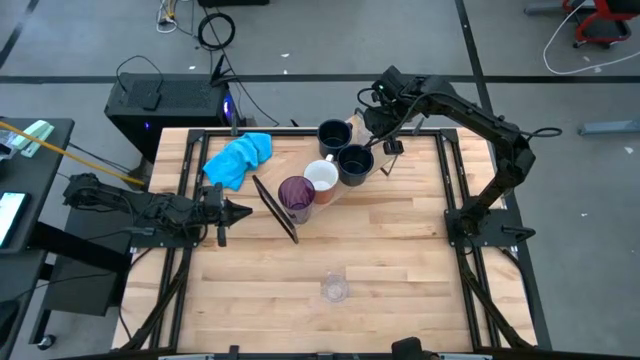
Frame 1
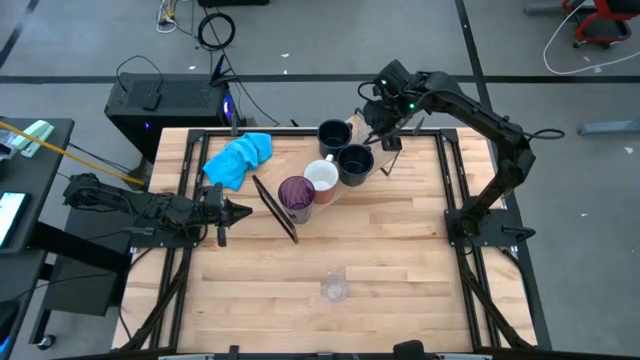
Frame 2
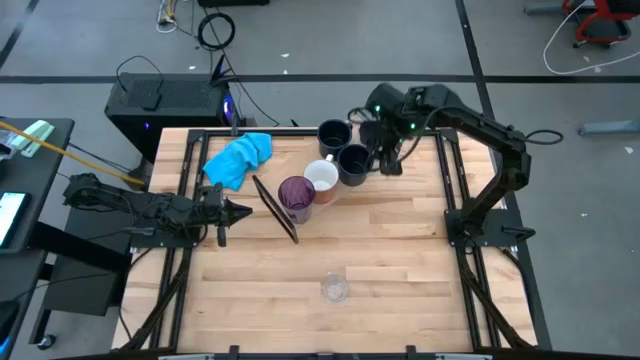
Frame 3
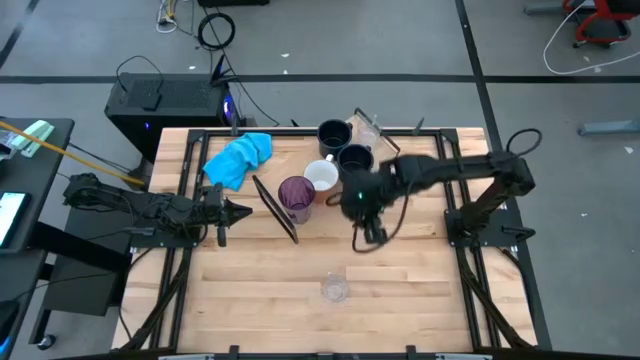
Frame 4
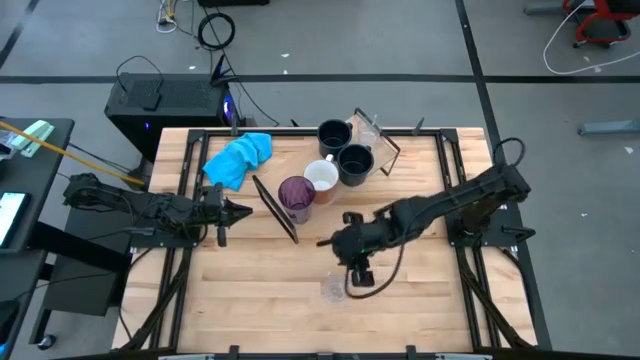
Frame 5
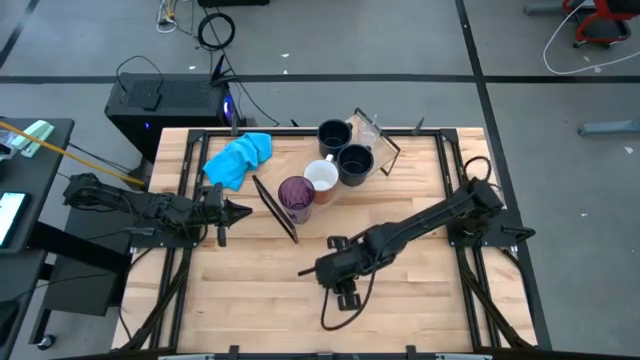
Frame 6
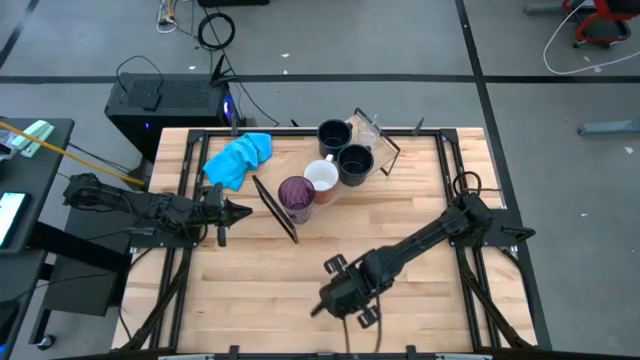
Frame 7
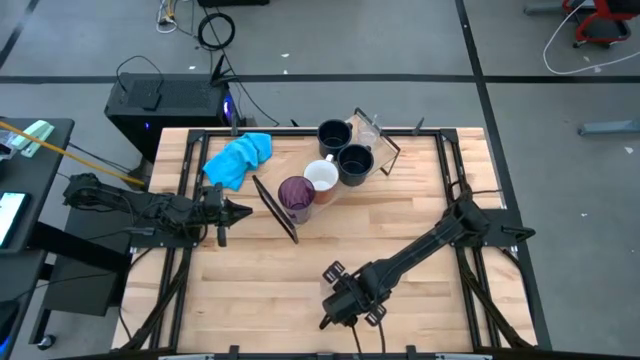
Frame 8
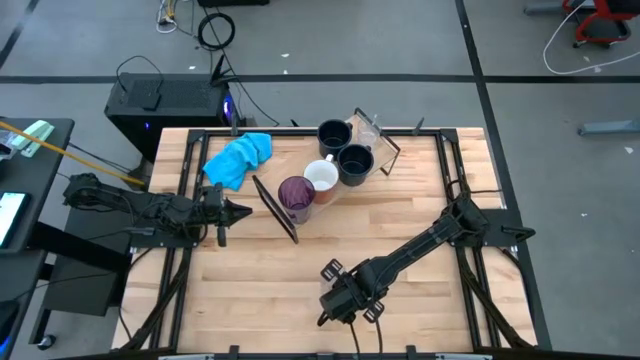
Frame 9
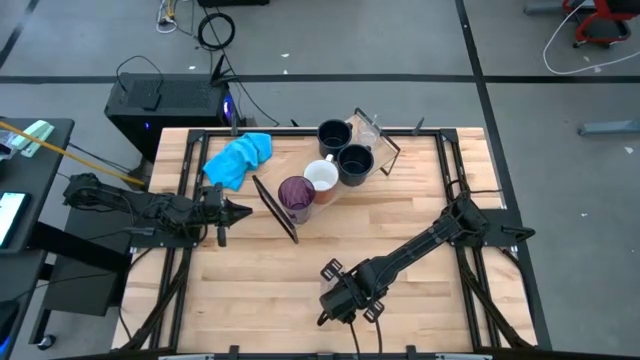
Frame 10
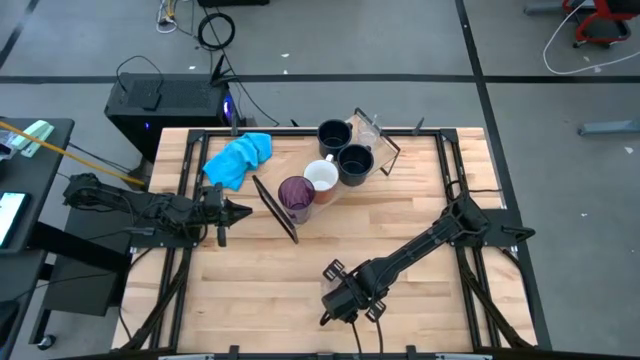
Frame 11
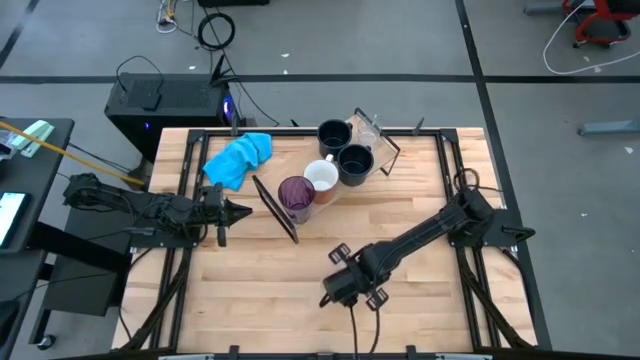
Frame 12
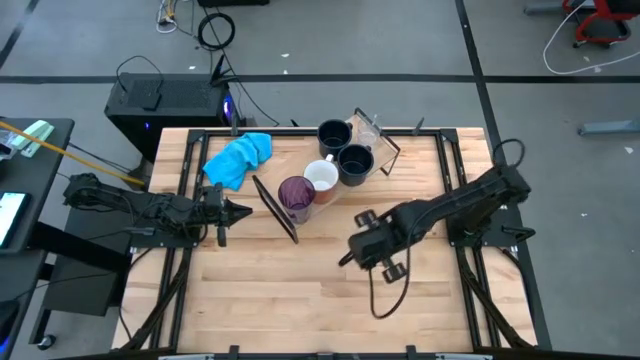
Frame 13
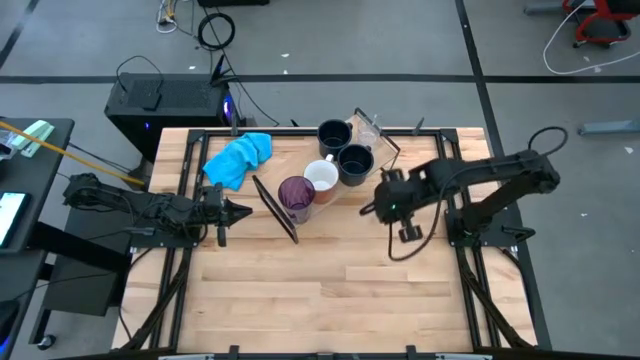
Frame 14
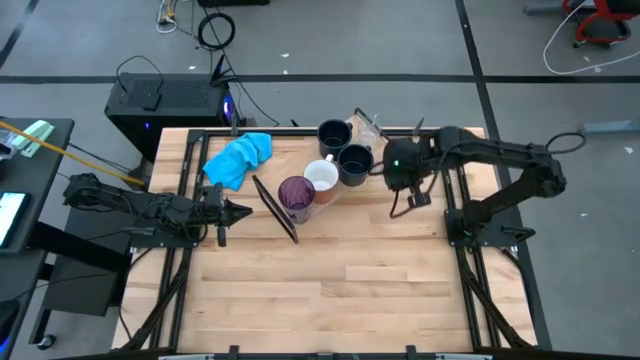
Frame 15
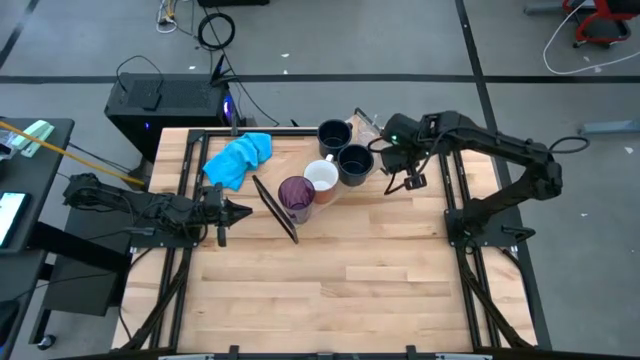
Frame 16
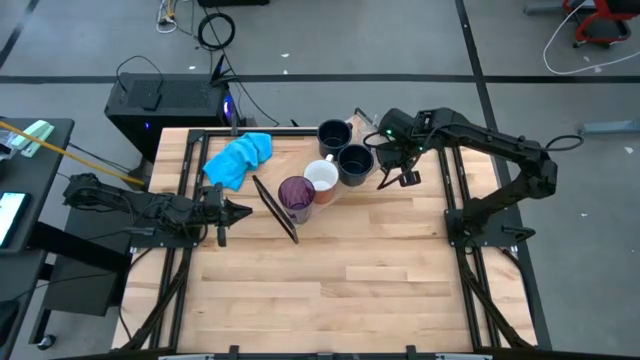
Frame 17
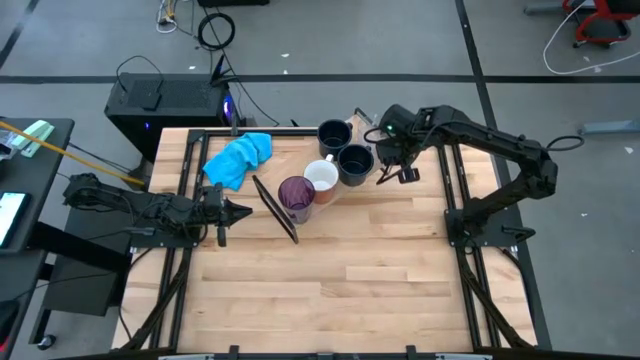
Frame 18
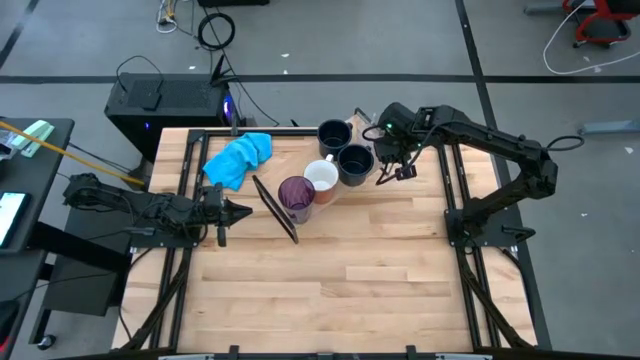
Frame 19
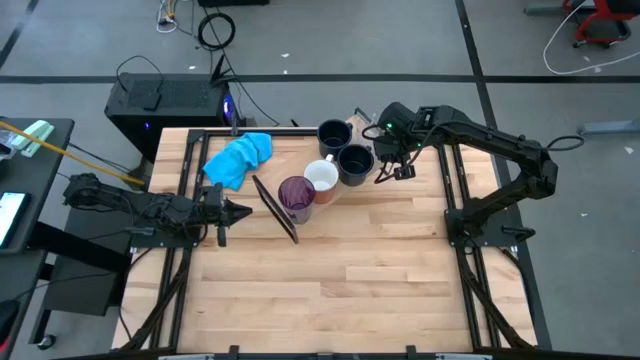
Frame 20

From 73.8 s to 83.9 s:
Task: Stack small to large cups/mugs on shelf
Put the transparent mug on the shelf aligned with the other transparent mug

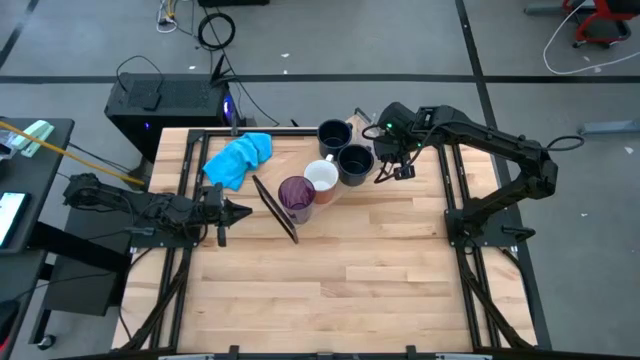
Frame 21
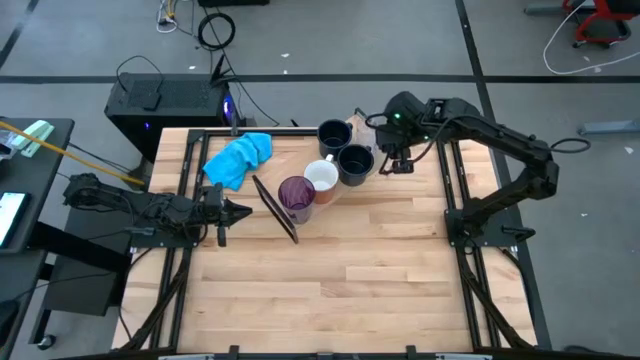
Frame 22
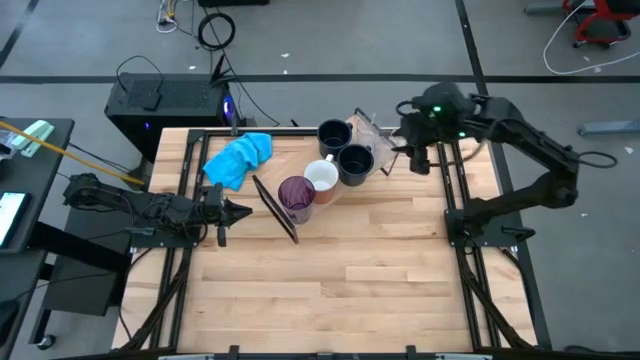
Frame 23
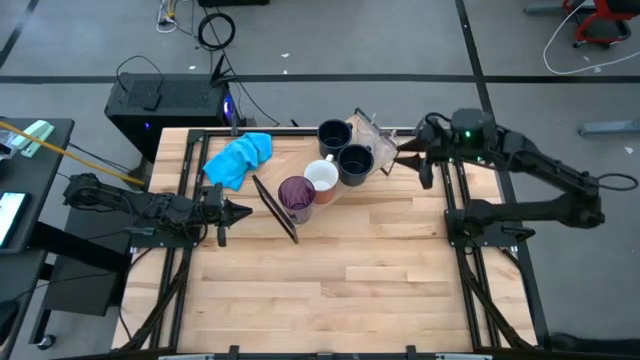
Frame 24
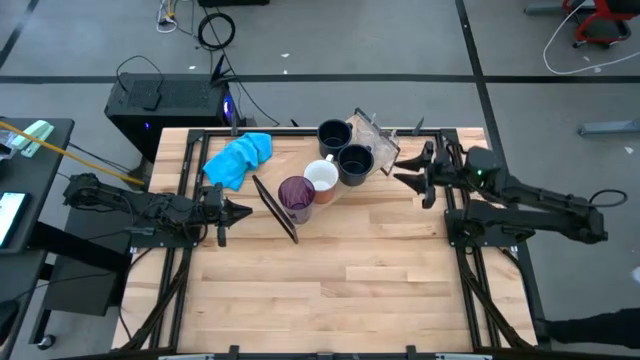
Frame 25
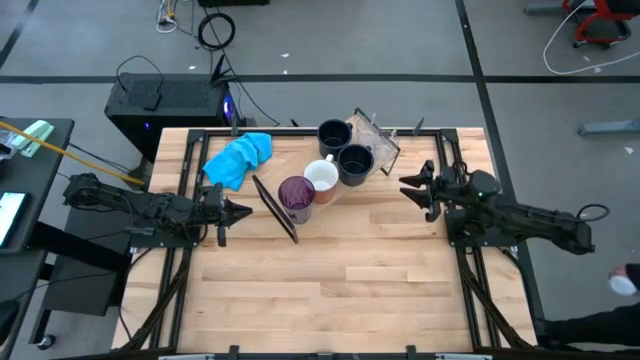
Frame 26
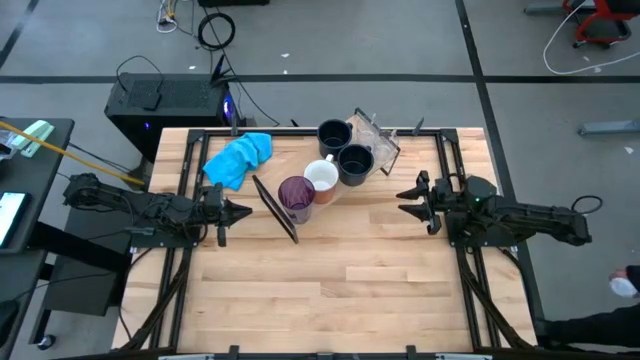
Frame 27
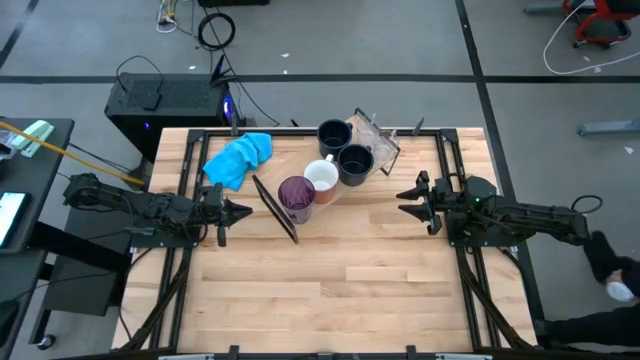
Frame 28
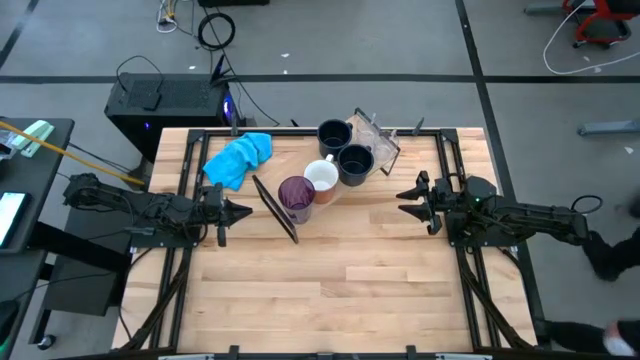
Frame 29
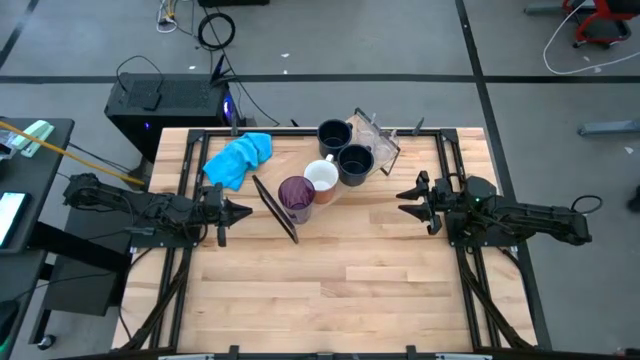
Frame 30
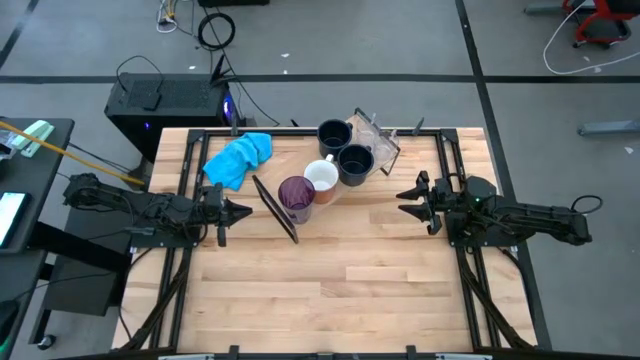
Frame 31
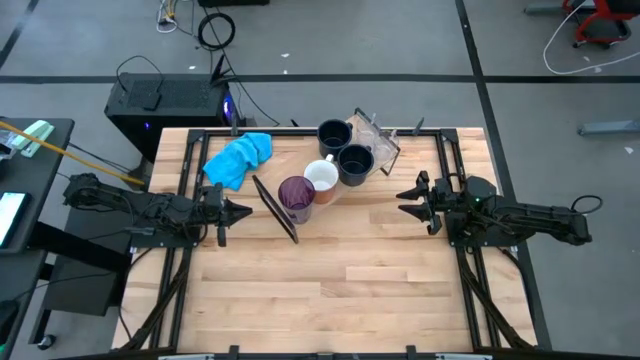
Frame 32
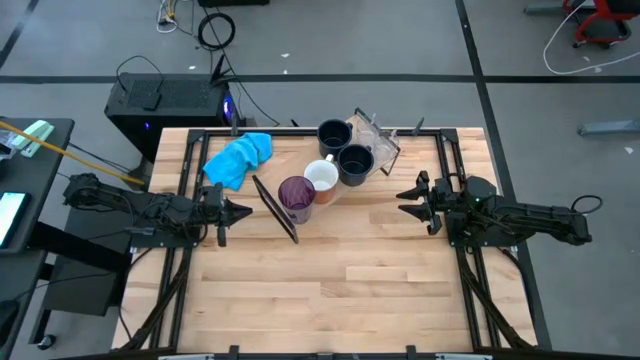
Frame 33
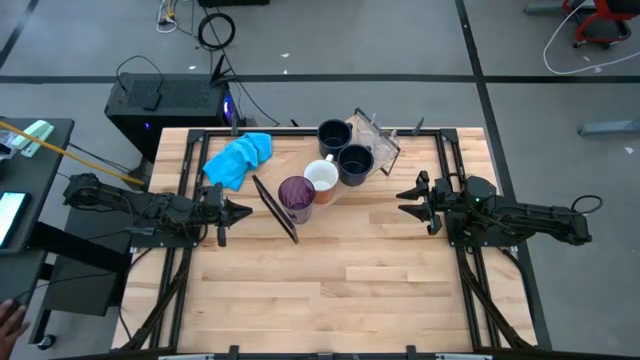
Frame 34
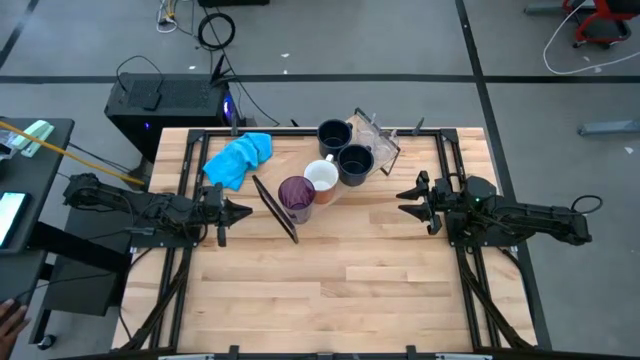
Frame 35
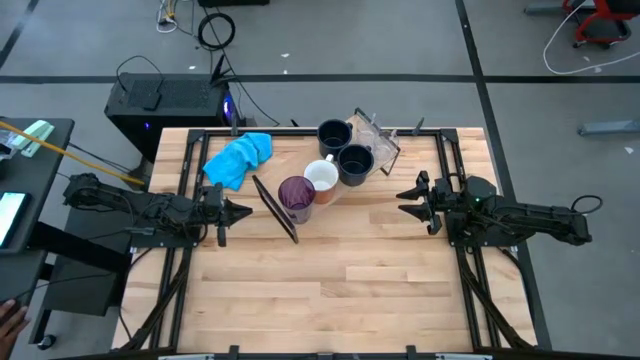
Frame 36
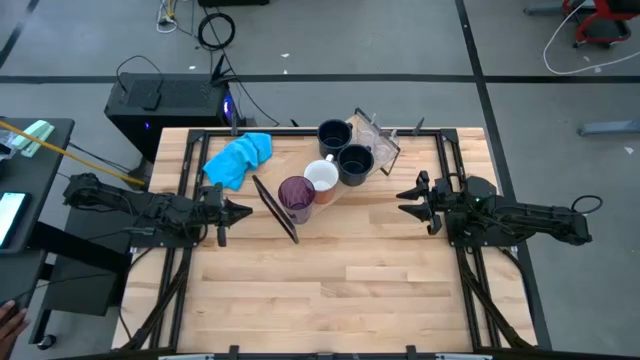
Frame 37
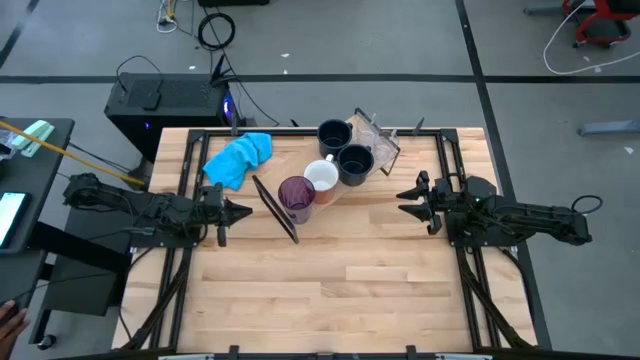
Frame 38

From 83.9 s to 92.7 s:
Return to Home Position

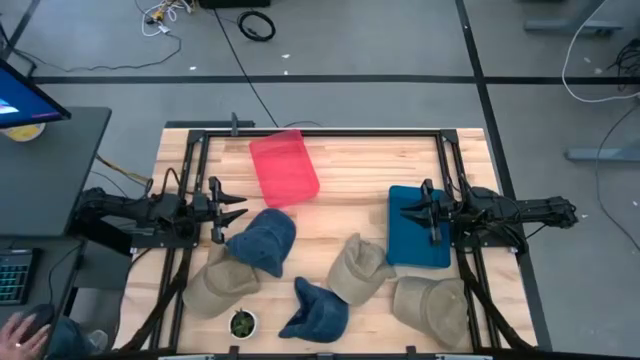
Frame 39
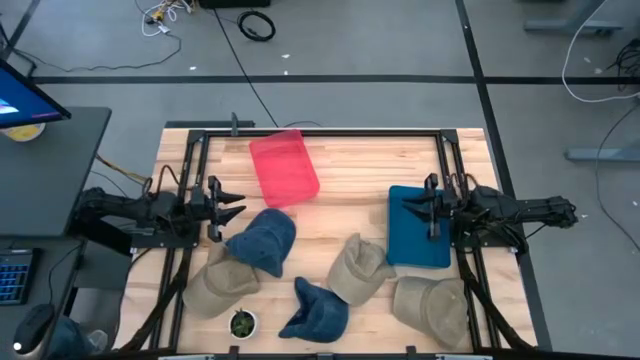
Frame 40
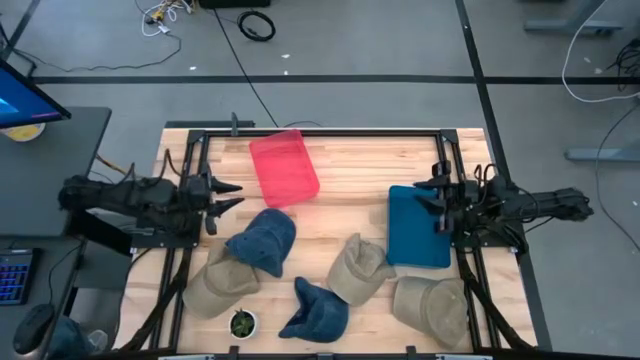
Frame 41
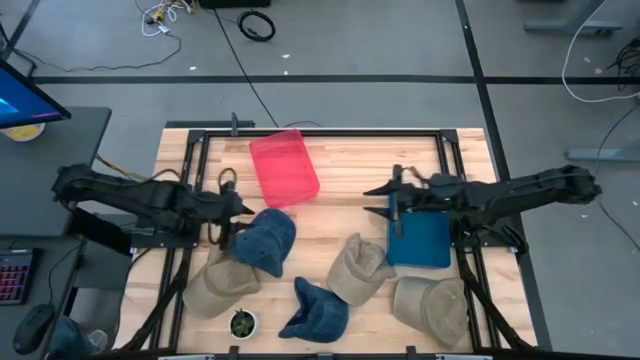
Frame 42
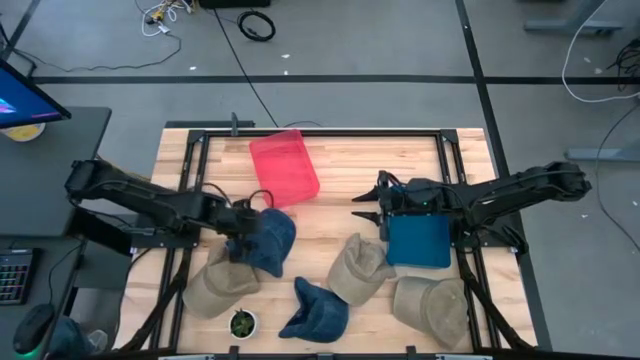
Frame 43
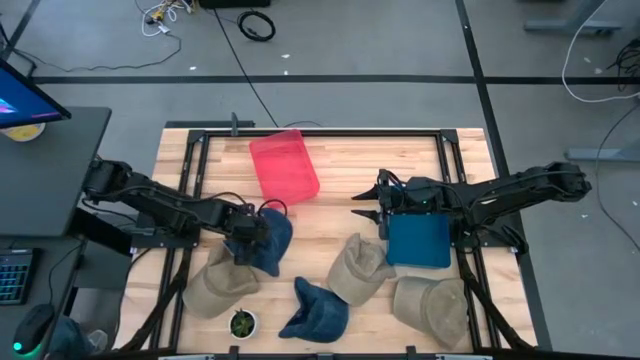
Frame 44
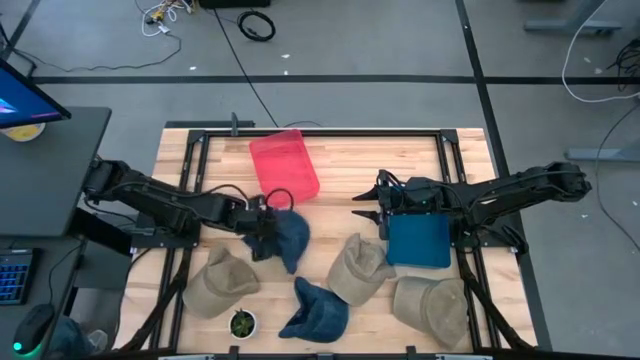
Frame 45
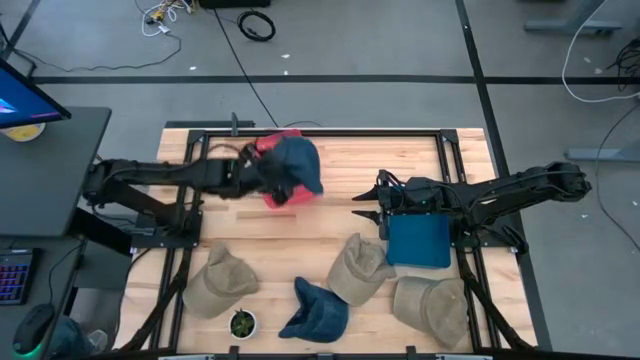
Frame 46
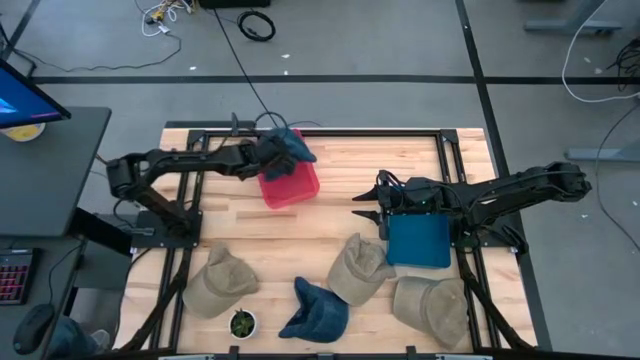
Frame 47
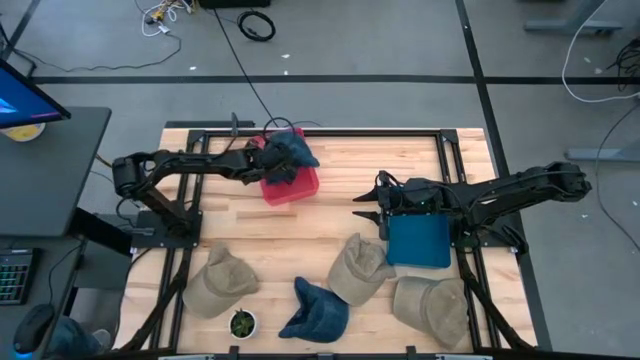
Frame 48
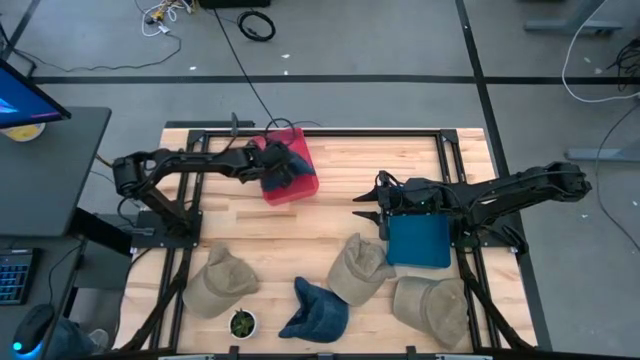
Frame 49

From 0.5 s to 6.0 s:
Task: Pick & Place hat
Put the top blue cap into the red bin
